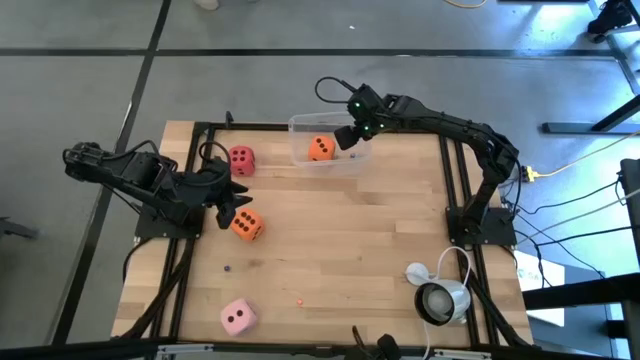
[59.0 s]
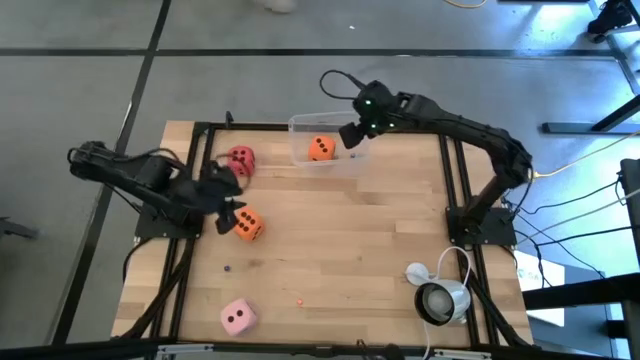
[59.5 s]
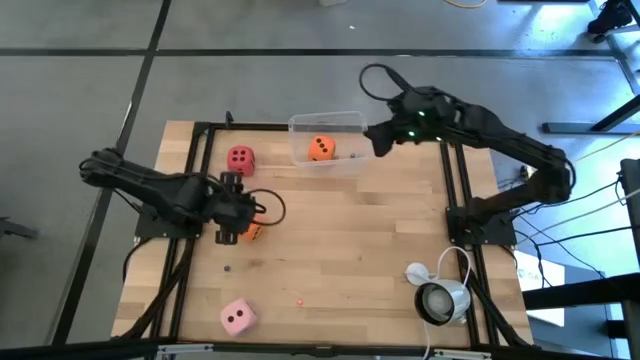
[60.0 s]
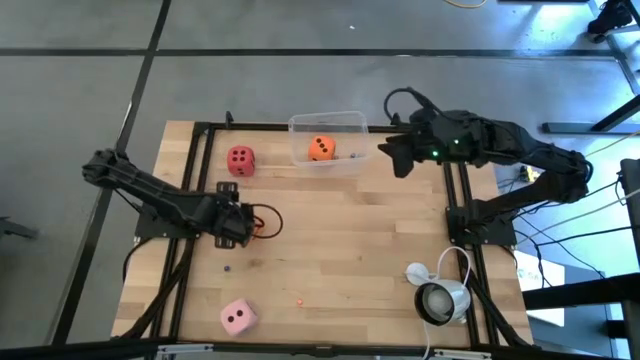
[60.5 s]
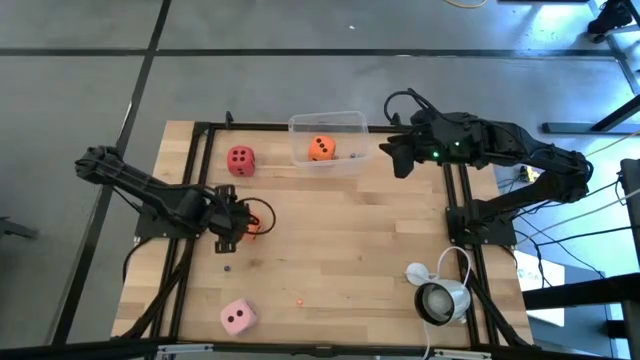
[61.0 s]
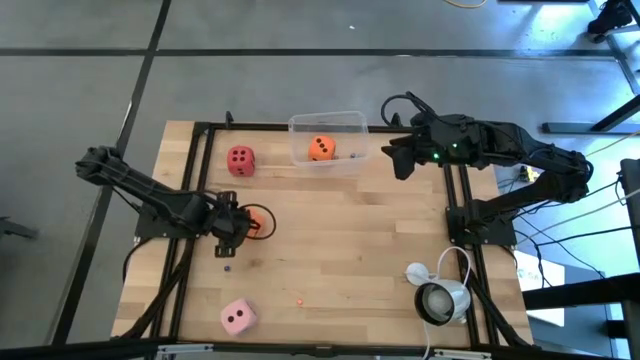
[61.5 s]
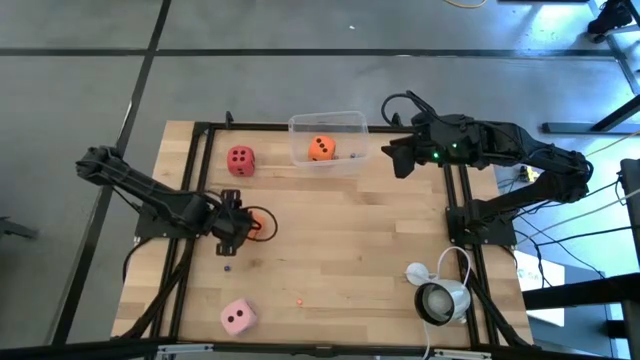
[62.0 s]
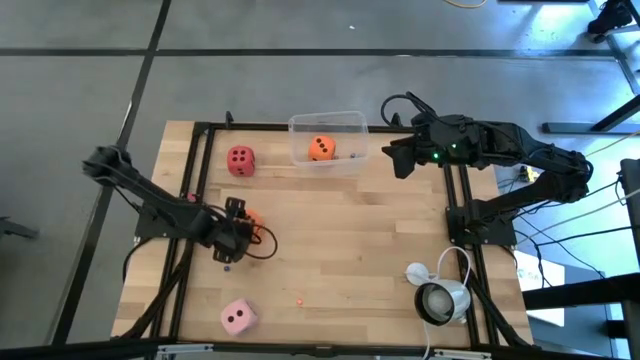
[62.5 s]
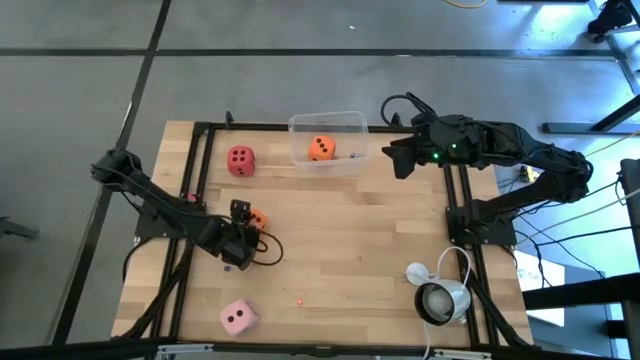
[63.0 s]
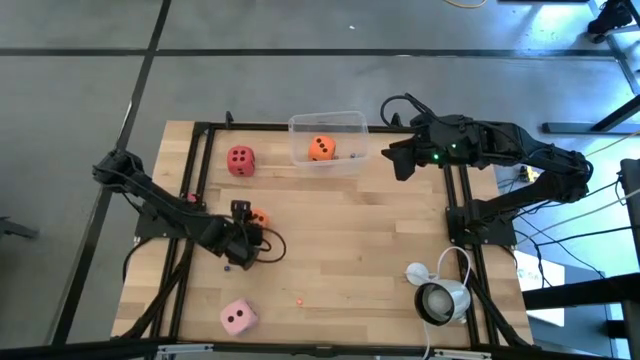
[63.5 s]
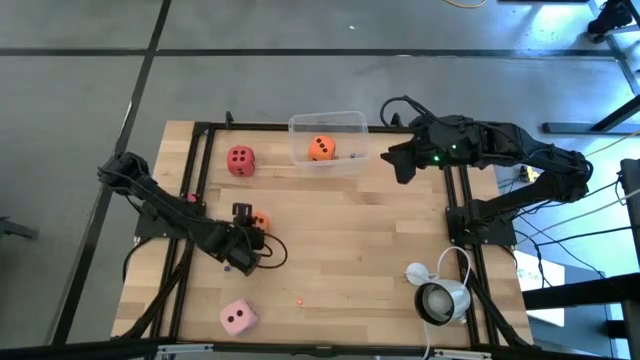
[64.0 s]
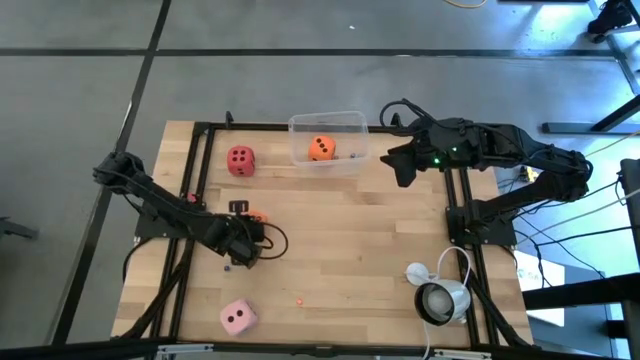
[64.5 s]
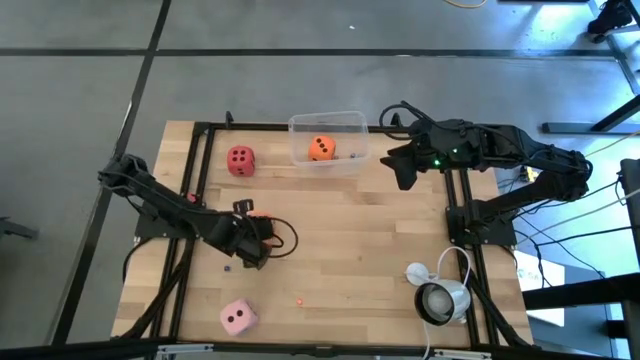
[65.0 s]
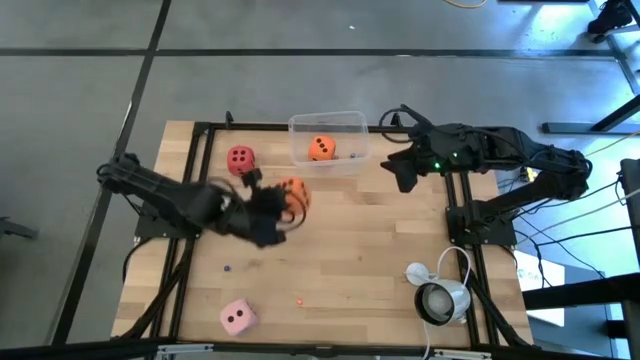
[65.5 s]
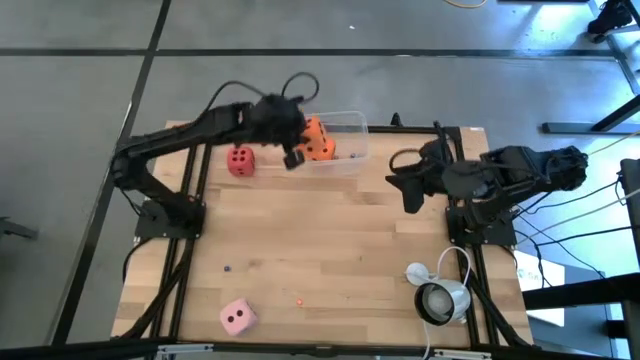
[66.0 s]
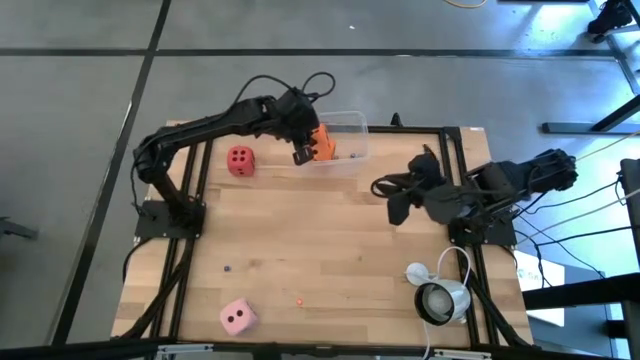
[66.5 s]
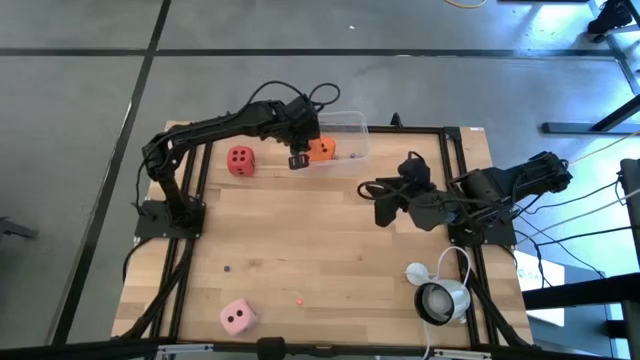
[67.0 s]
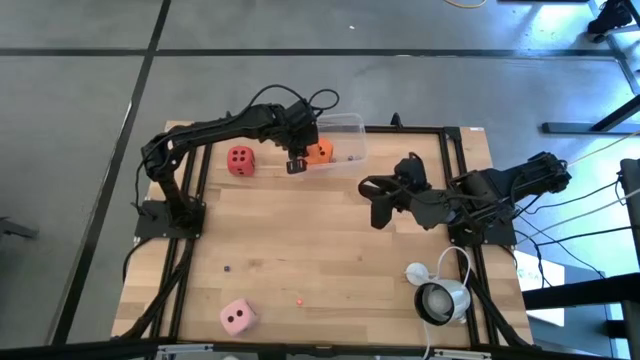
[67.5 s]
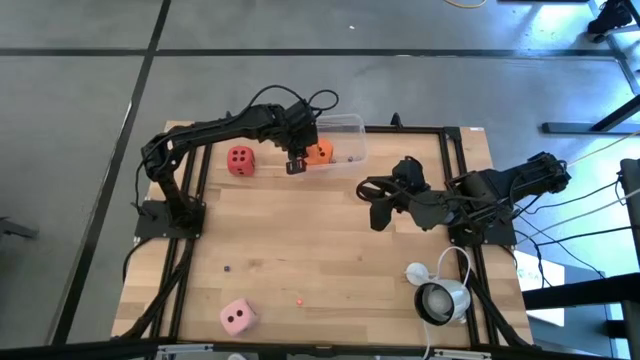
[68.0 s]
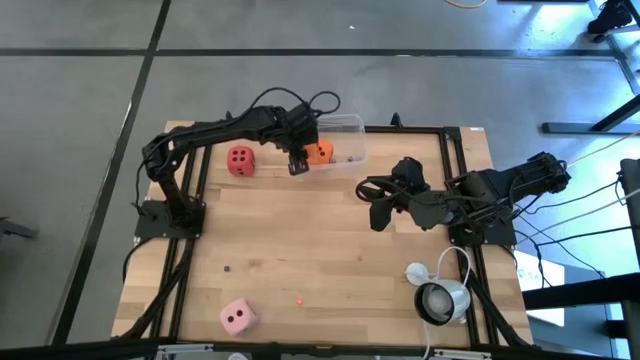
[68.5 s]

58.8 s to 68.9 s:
Task: Pick & Place Dice
Put the large orange dice into the transparent bin

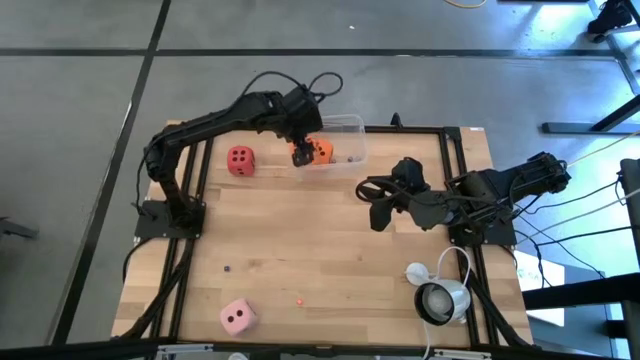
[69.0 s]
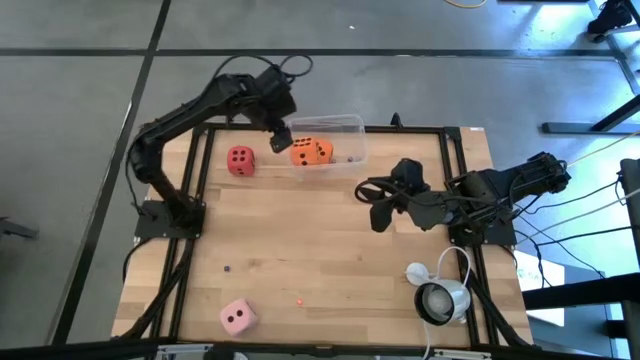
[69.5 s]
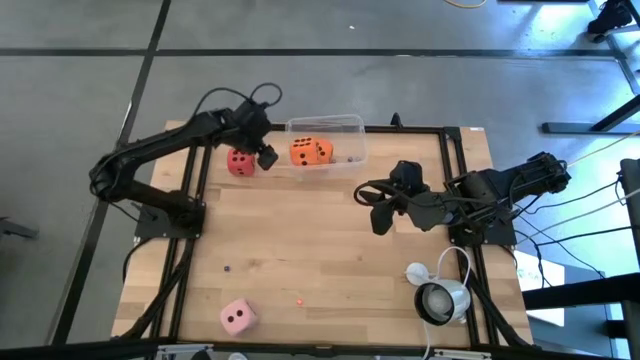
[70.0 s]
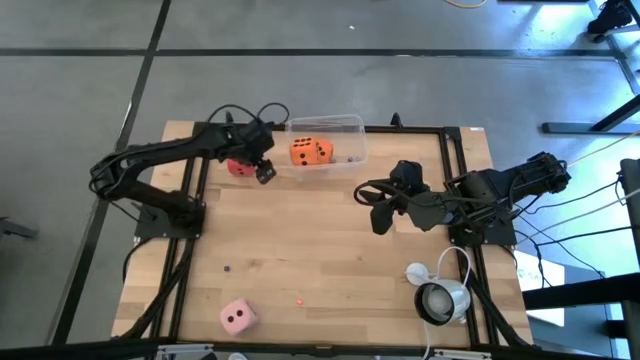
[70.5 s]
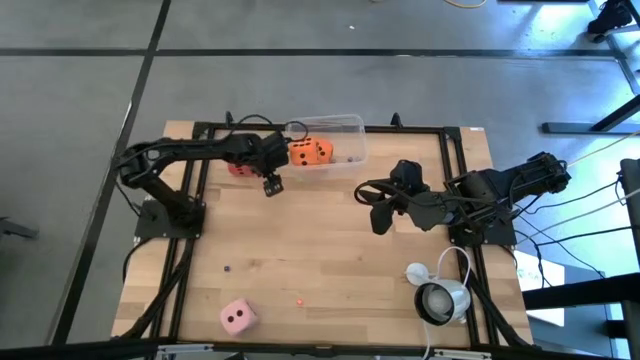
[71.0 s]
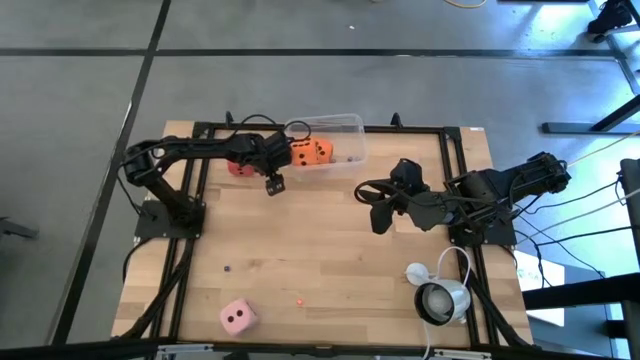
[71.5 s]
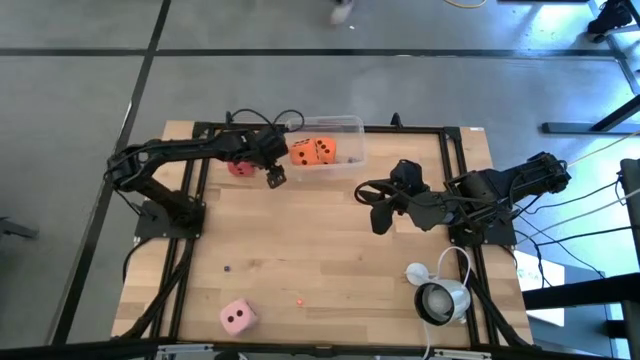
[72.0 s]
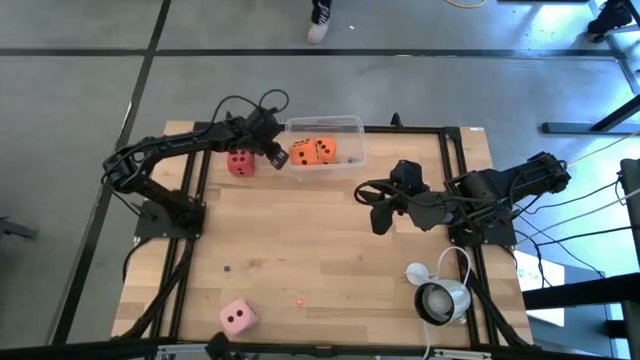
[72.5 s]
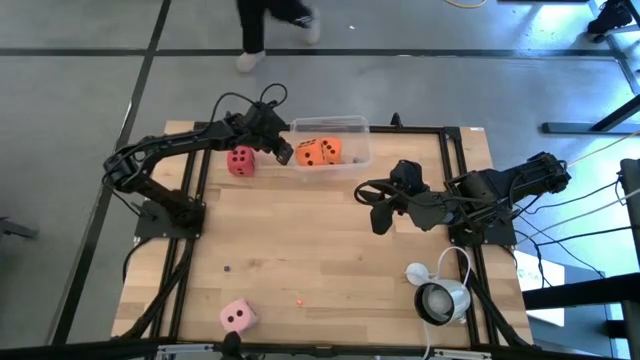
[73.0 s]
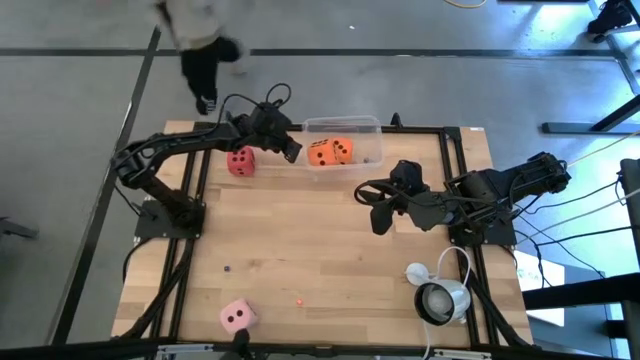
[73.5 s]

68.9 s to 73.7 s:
Adjust the transparent bin

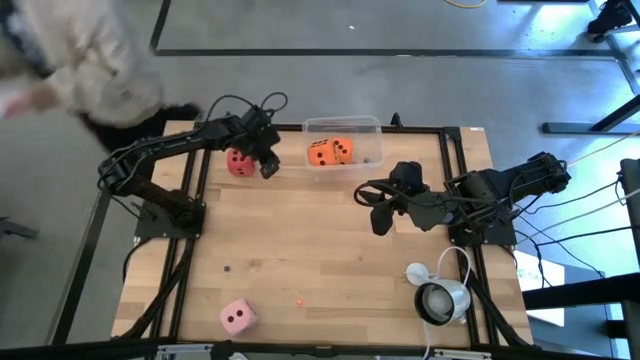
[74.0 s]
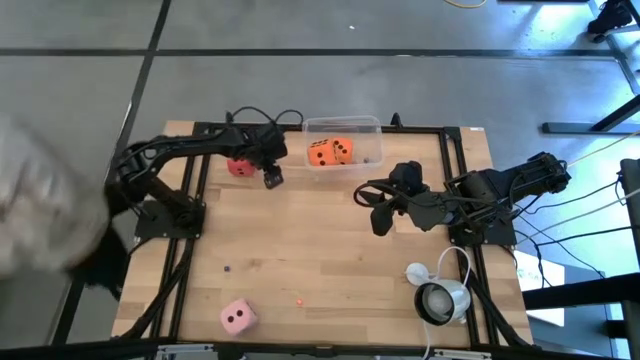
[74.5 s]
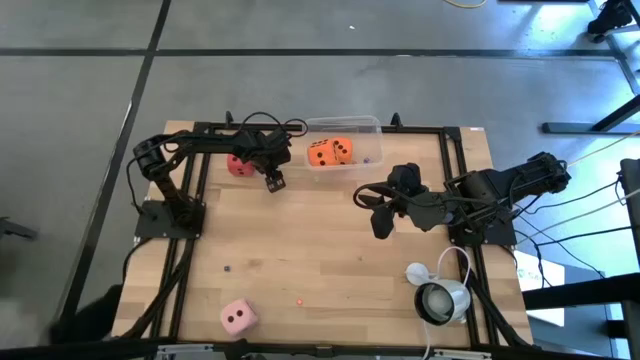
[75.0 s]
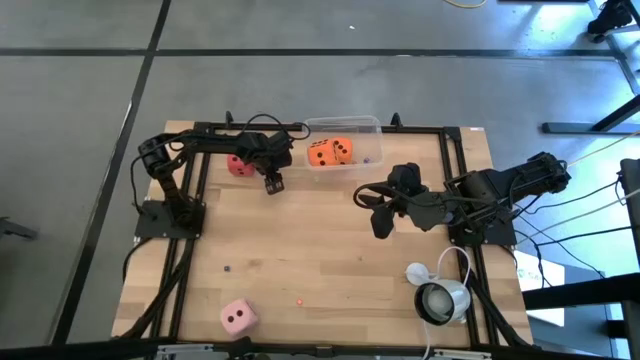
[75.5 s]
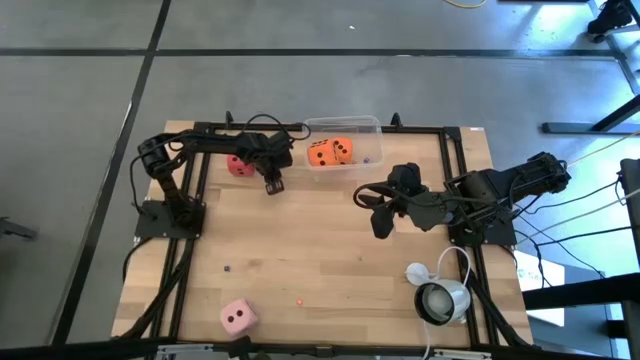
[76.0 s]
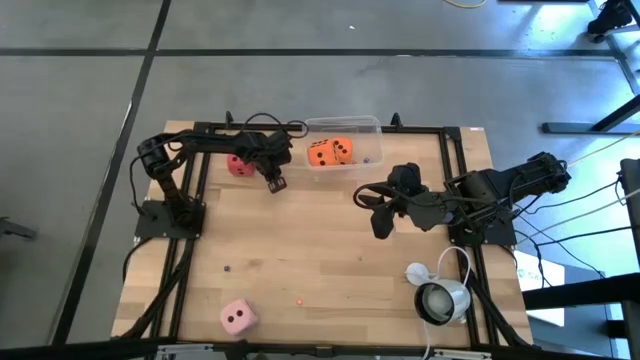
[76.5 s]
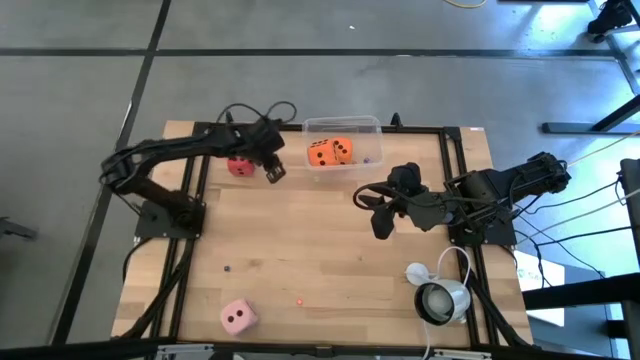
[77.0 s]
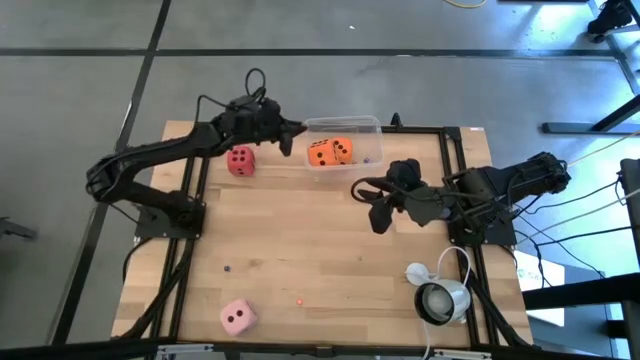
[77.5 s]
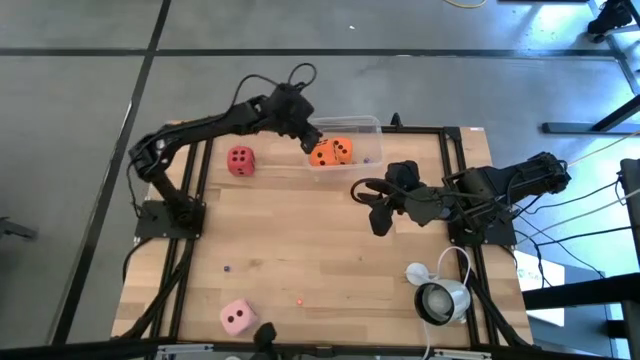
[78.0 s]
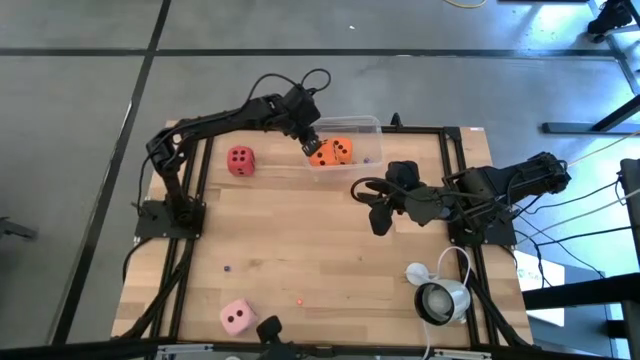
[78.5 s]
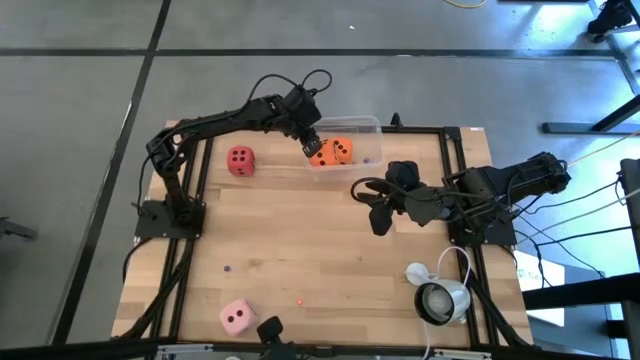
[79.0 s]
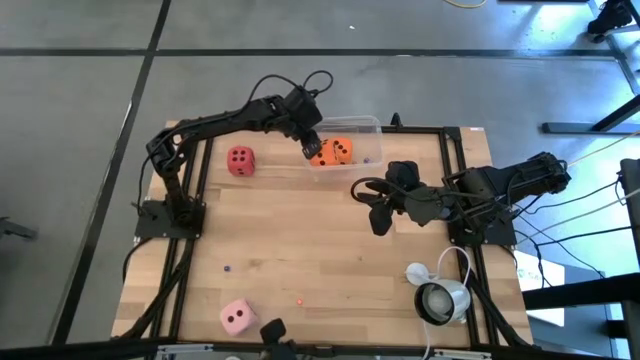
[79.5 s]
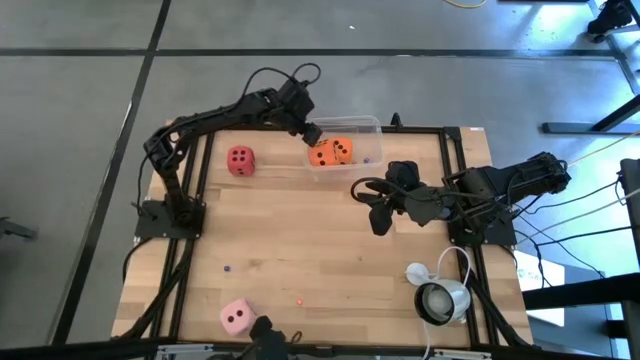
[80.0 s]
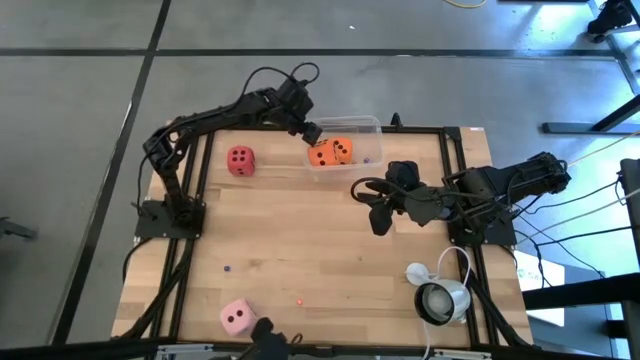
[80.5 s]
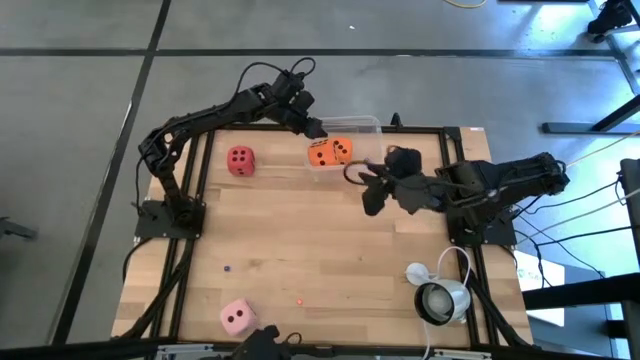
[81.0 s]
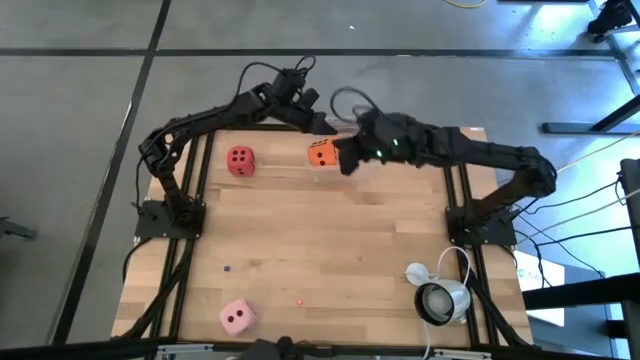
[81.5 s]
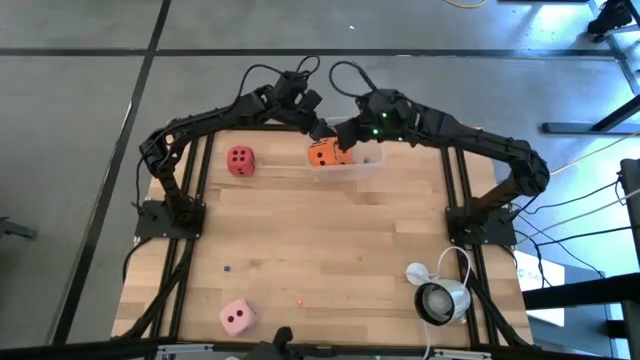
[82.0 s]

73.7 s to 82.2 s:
Put the small yellow dice into the transparent bin
